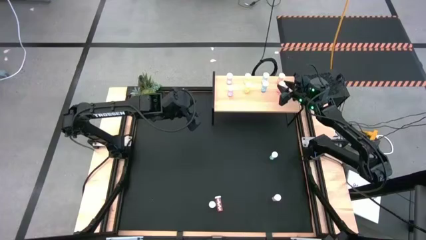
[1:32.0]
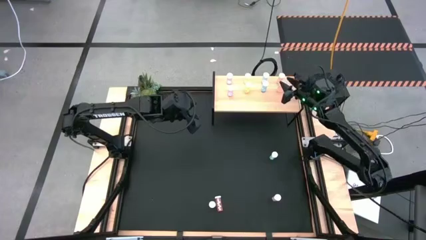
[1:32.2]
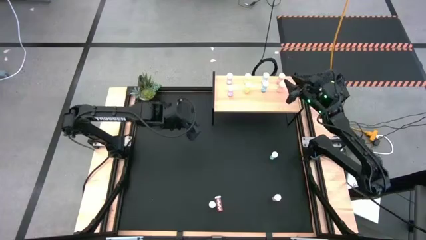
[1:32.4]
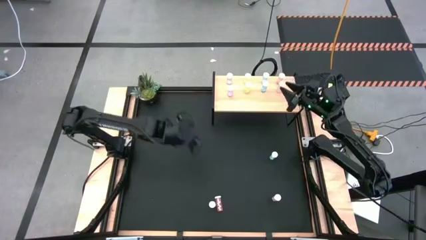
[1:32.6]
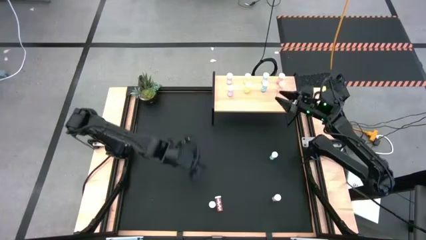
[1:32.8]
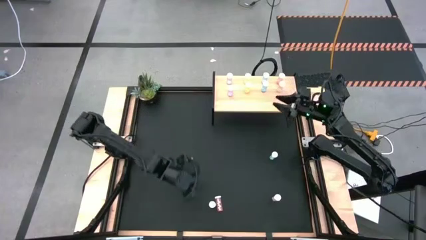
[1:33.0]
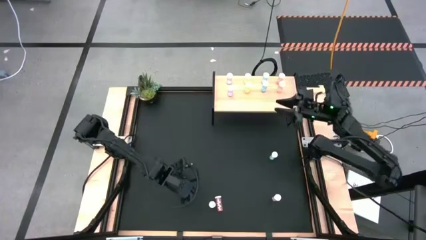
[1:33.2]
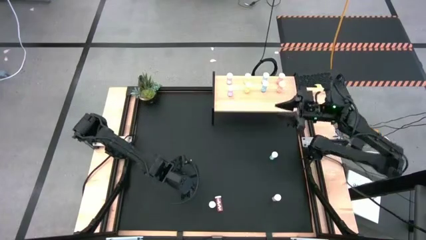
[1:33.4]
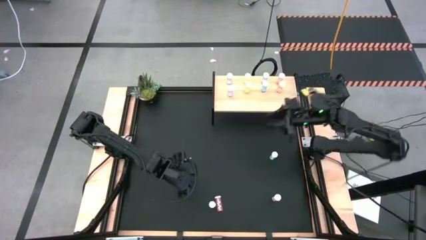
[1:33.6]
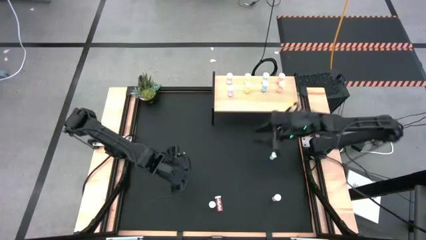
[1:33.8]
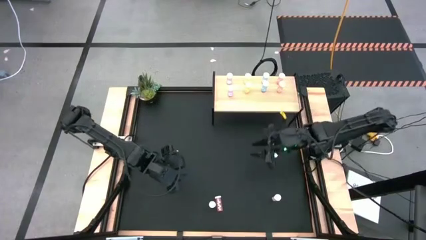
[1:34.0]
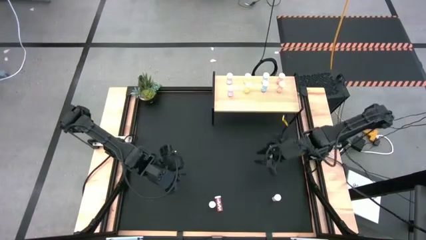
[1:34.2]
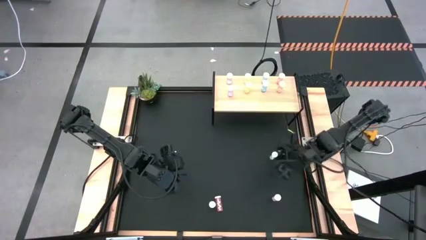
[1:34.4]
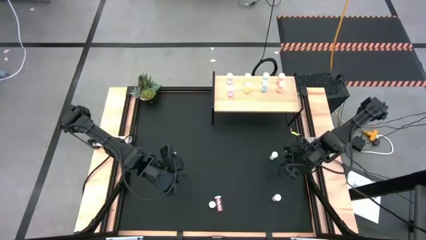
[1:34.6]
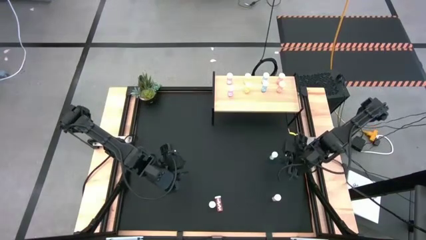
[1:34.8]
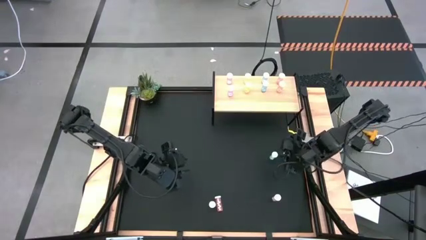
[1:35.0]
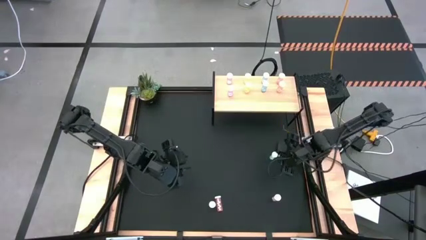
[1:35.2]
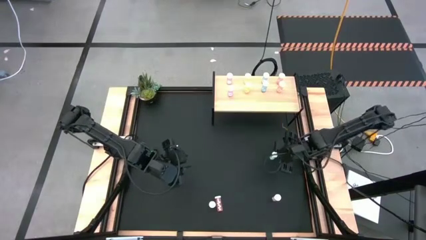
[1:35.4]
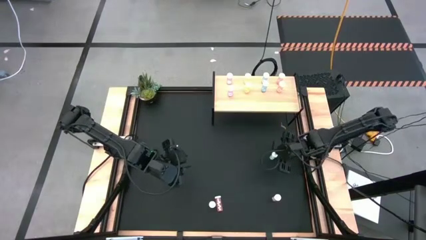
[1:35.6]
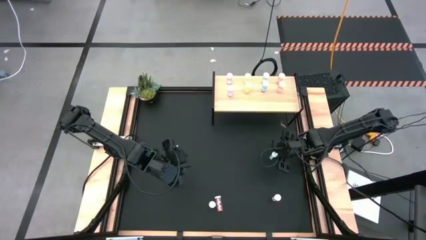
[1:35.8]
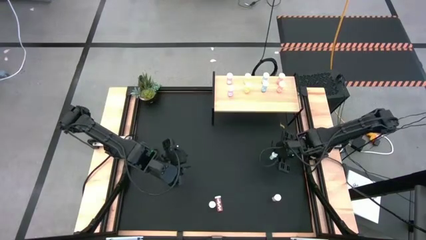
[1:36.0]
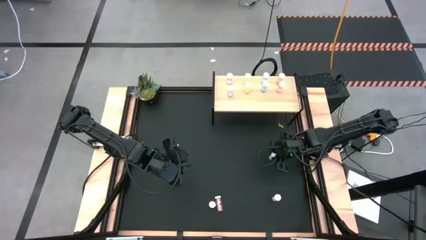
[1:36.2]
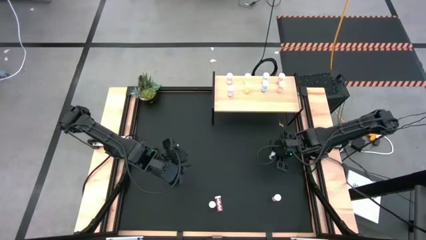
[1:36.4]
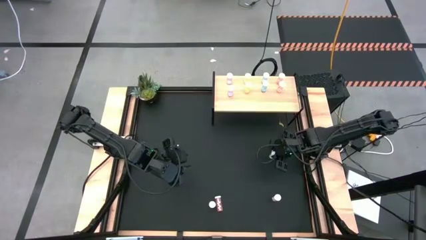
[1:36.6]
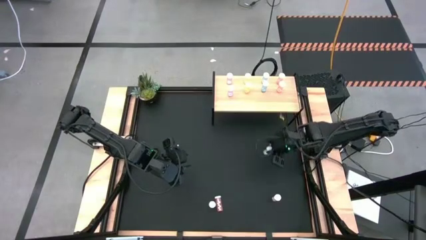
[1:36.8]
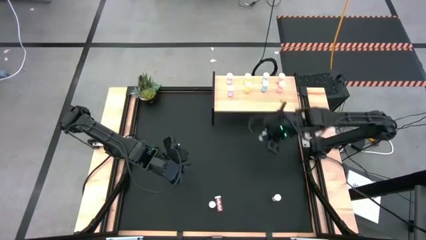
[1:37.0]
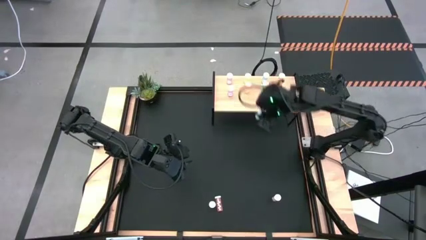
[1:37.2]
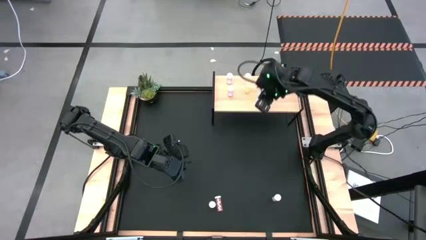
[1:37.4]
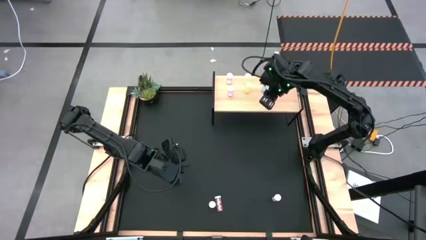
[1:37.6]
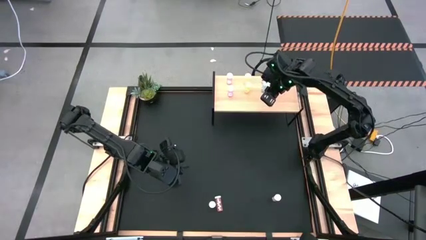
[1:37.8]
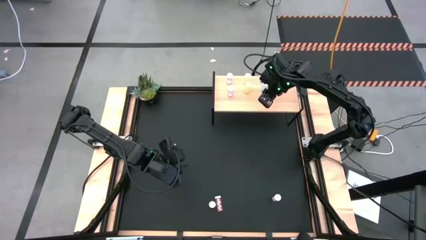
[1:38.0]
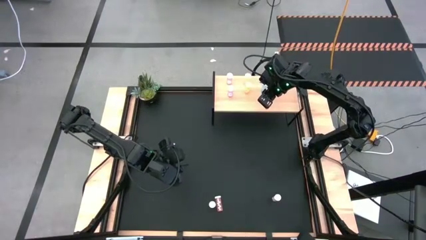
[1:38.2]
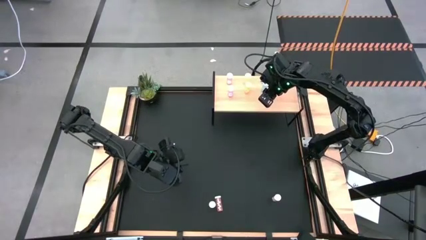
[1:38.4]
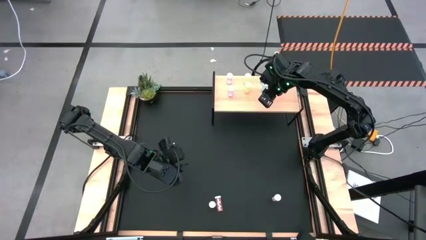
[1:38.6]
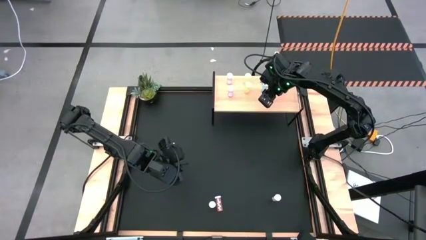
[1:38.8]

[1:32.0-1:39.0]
Task: Pick and place medicine bottles onto shelf by color
Put the blue pill bottle on the shelf aligned with the other blue pill bottle

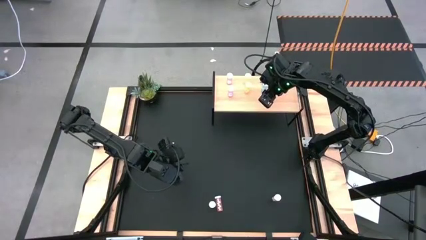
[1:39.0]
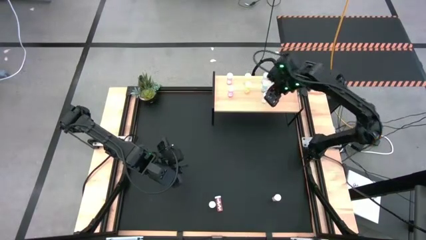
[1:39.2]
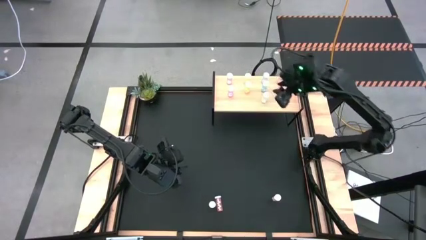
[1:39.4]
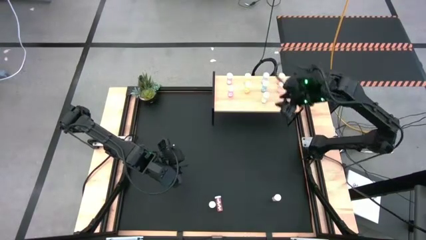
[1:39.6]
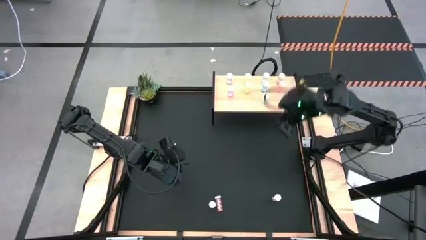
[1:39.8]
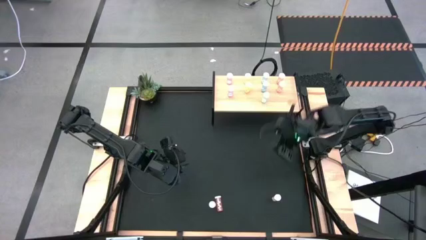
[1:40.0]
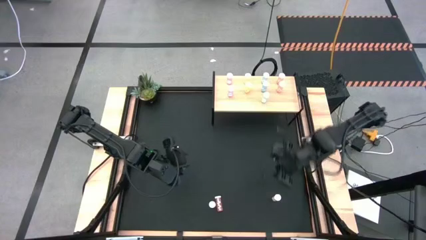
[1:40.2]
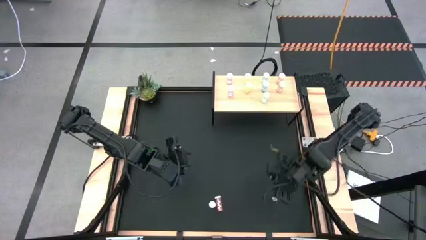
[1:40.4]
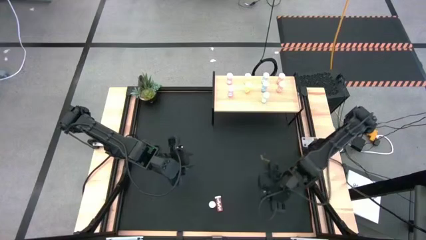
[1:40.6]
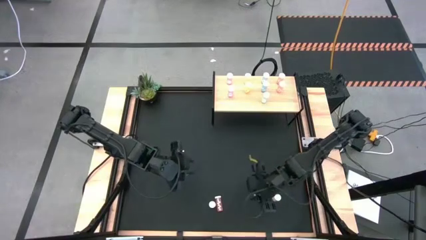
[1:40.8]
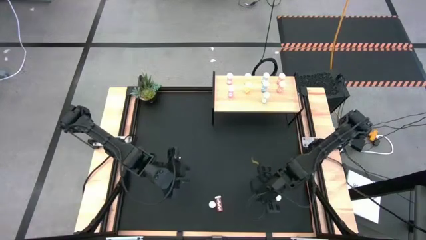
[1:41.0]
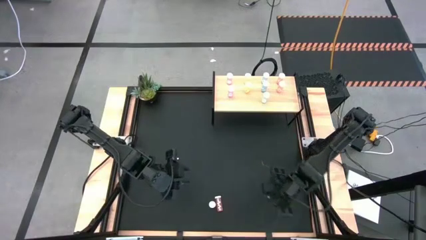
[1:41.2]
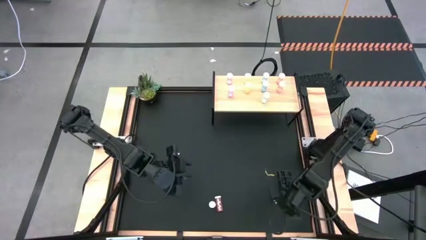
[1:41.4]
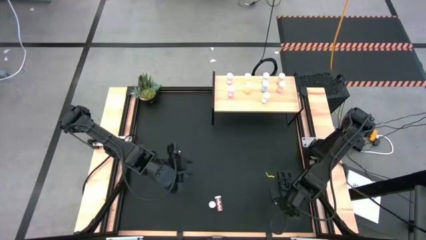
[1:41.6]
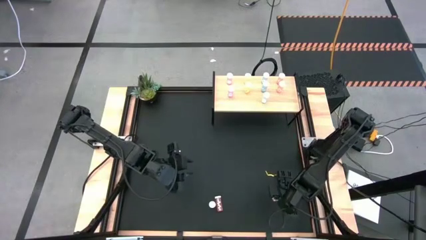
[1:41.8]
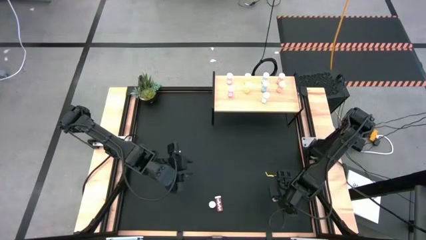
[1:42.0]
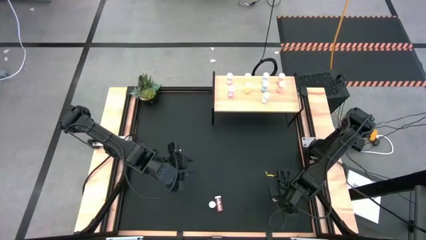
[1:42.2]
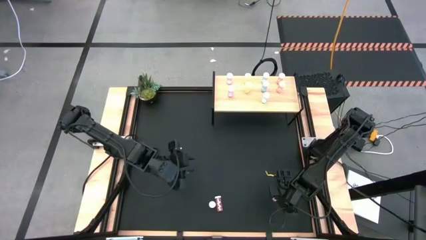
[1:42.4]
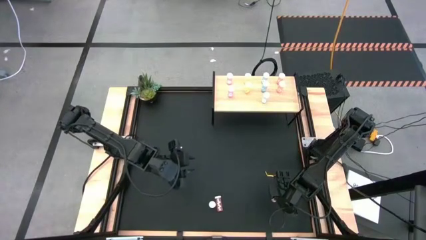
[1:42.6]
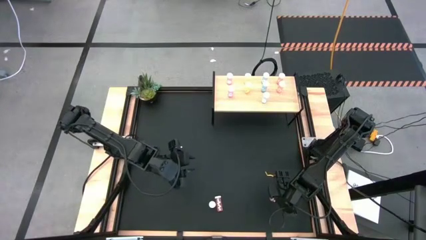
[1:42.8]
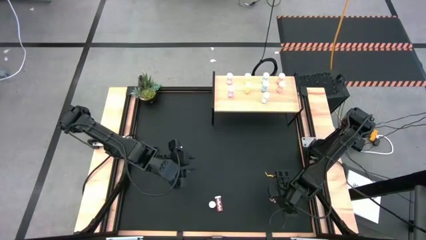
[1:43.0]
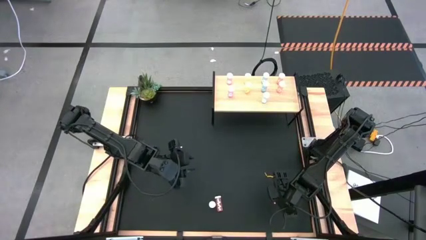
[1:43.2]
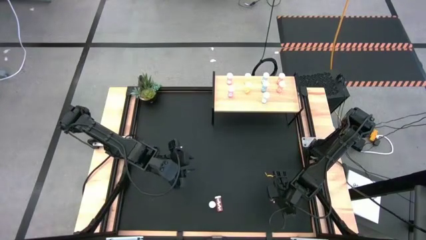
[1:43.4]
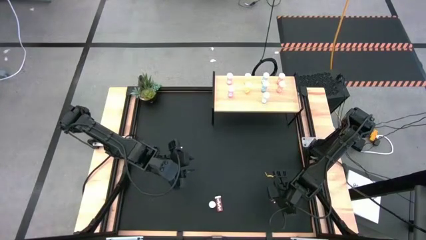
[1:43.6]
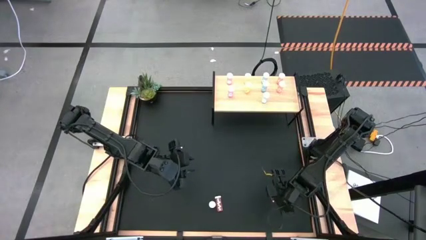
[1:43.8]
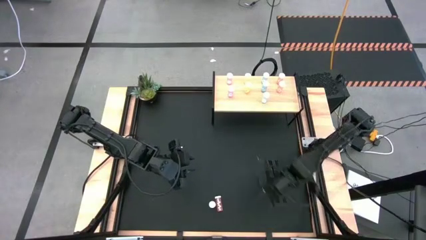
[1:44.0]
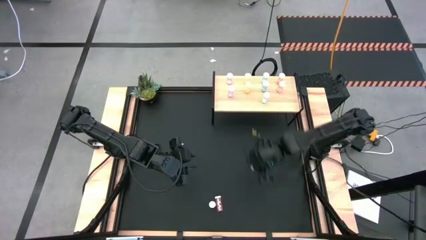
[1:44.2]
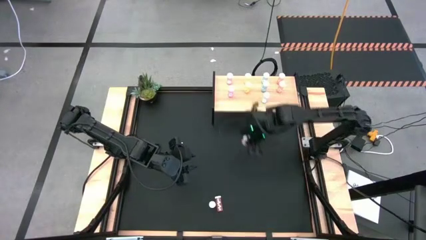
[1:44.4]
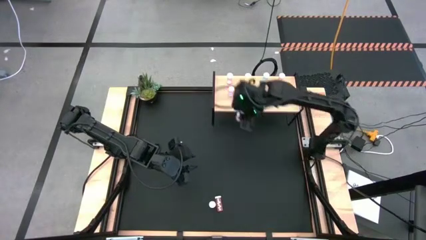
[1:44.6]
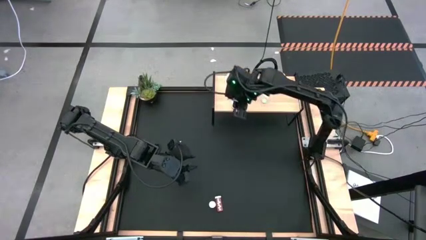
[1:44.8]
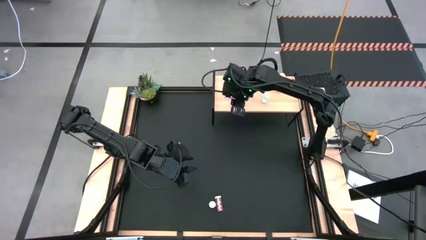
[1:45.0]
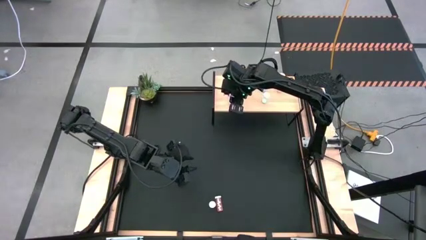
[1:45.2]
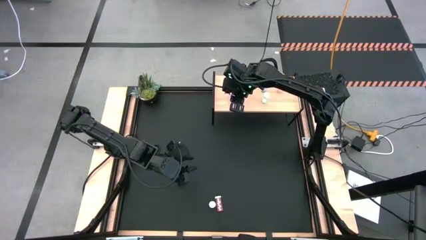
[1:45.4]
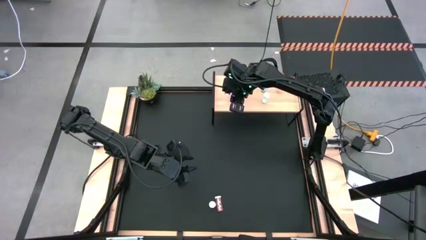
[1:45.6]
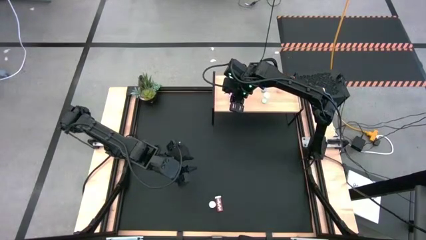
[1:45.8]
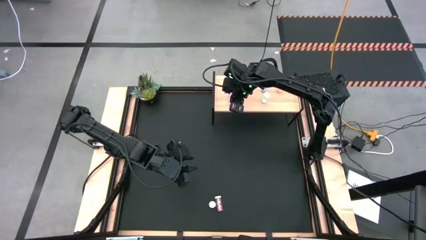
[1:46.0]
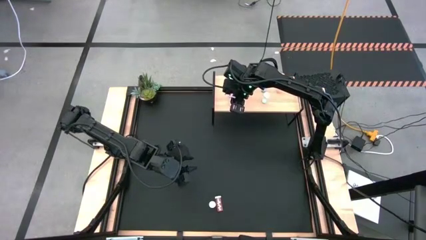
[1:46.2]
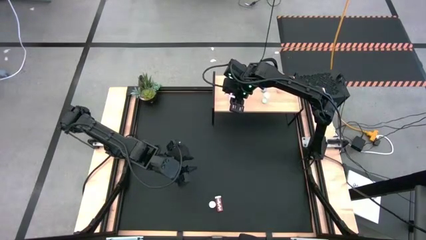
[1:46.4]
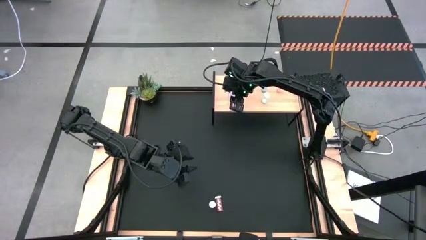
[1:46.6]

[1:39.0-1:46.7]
Put the violet pill bottle on the shelf aligned with the other violet pill bottle
